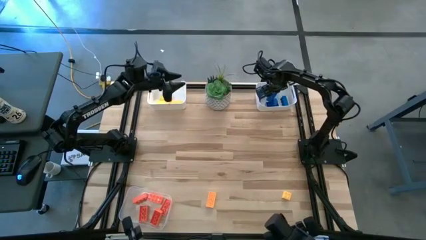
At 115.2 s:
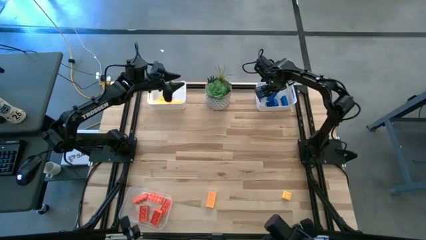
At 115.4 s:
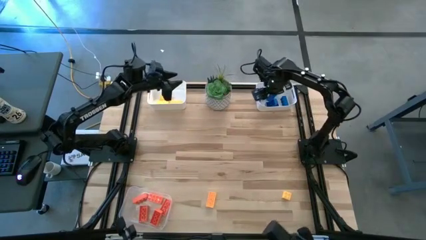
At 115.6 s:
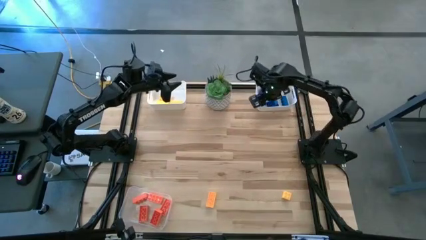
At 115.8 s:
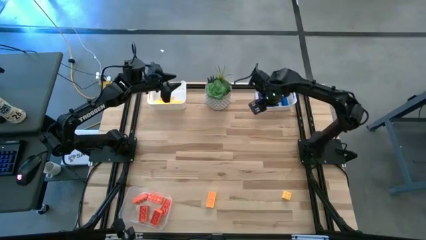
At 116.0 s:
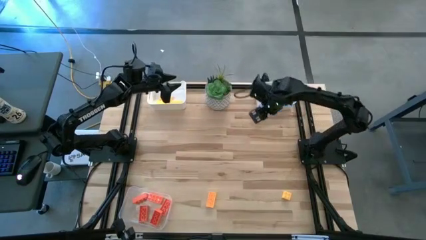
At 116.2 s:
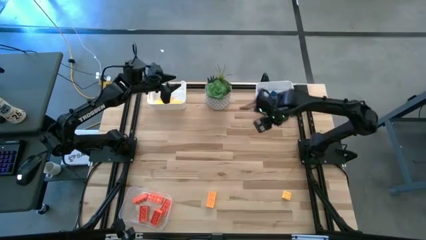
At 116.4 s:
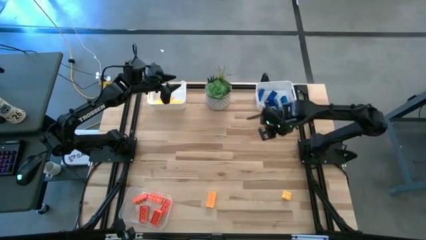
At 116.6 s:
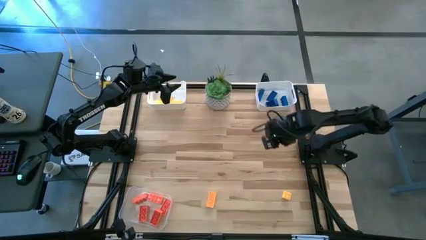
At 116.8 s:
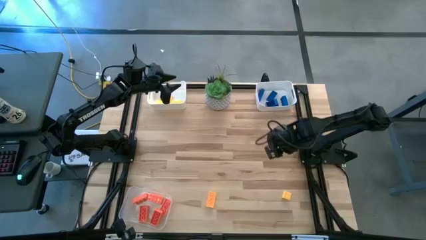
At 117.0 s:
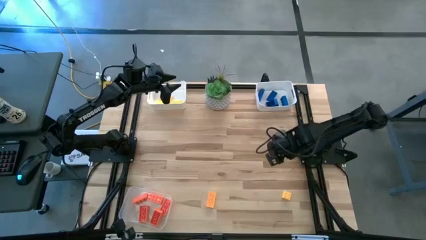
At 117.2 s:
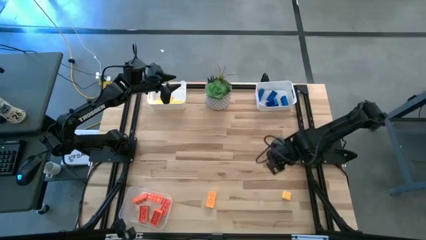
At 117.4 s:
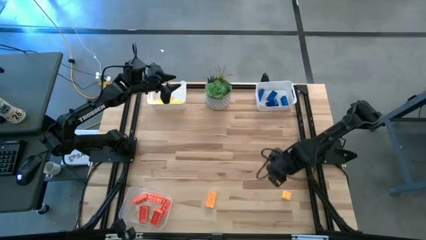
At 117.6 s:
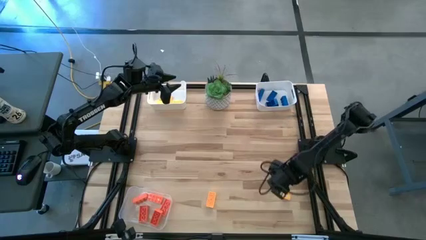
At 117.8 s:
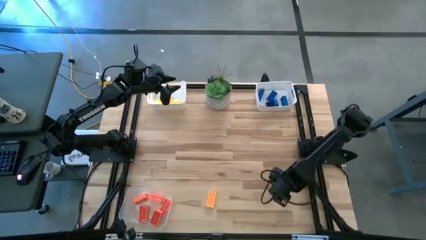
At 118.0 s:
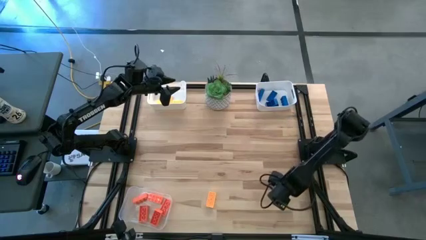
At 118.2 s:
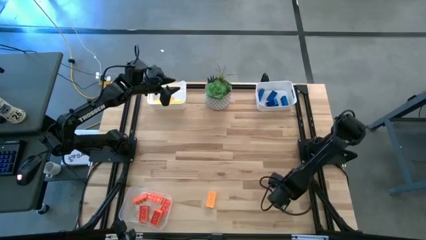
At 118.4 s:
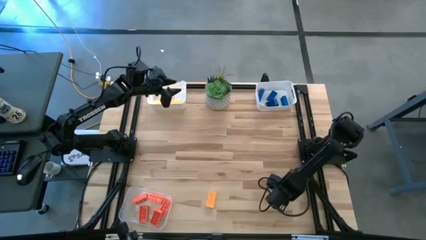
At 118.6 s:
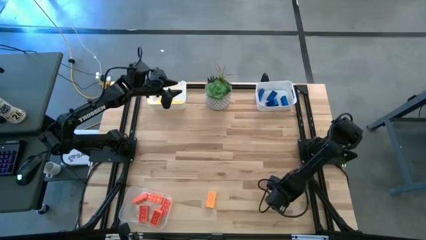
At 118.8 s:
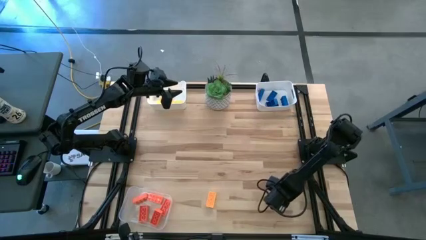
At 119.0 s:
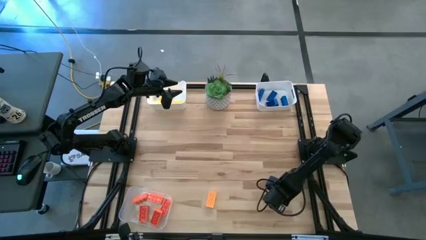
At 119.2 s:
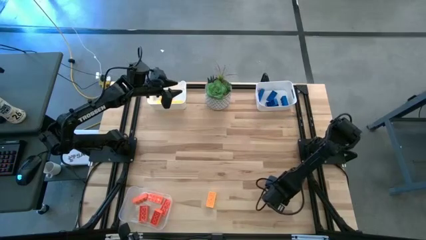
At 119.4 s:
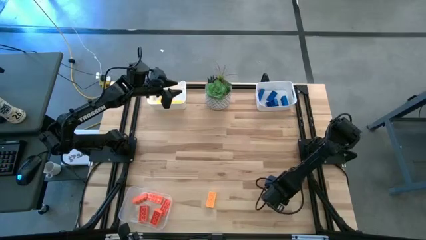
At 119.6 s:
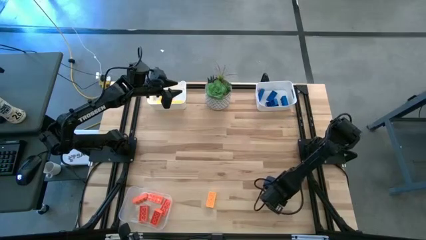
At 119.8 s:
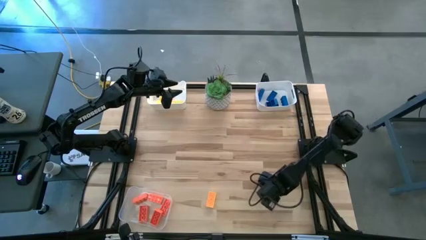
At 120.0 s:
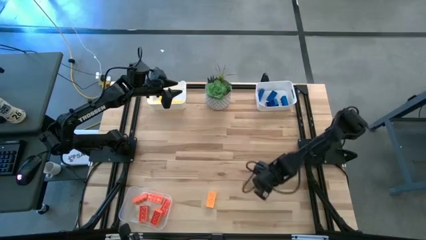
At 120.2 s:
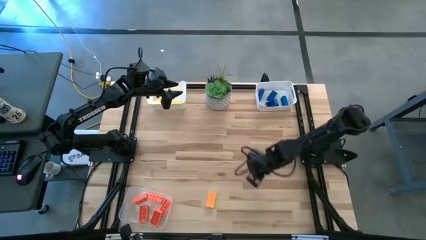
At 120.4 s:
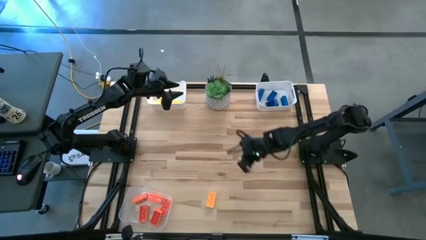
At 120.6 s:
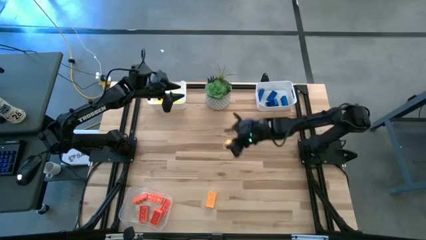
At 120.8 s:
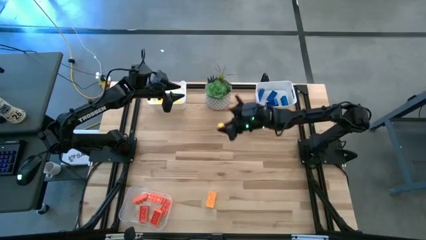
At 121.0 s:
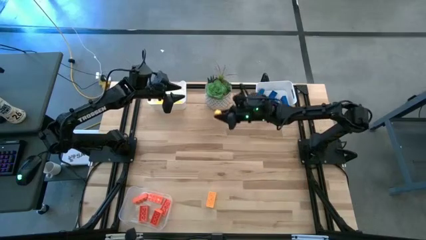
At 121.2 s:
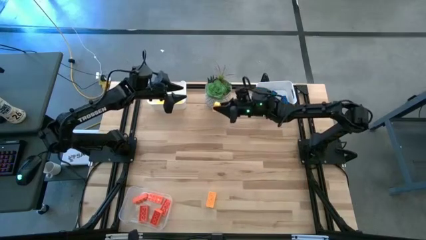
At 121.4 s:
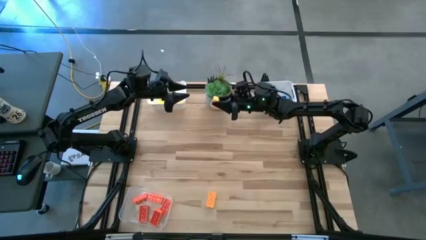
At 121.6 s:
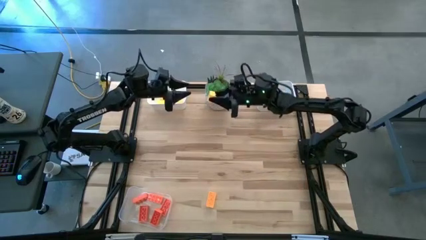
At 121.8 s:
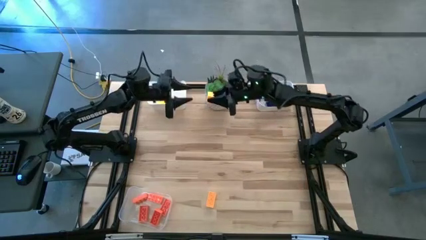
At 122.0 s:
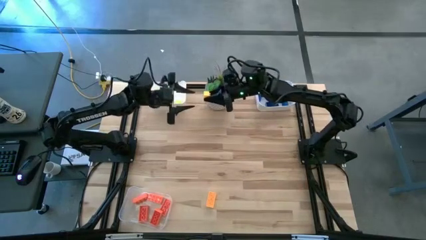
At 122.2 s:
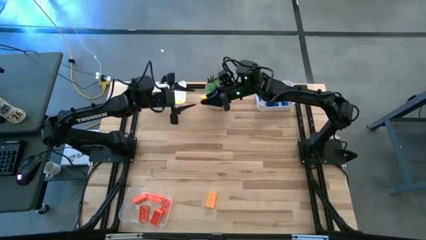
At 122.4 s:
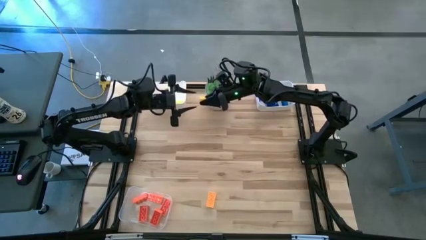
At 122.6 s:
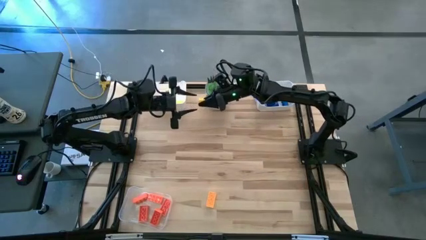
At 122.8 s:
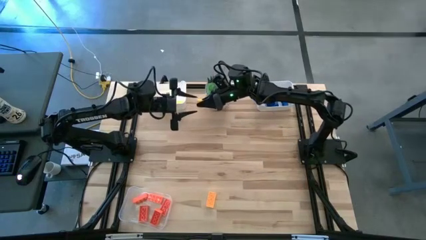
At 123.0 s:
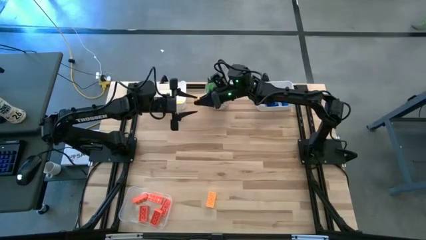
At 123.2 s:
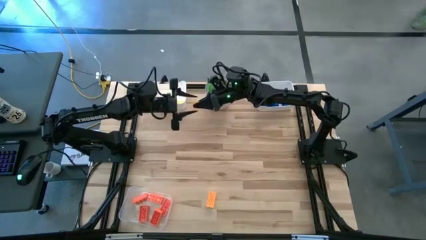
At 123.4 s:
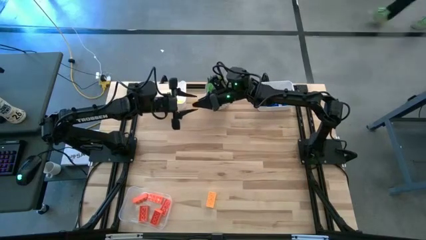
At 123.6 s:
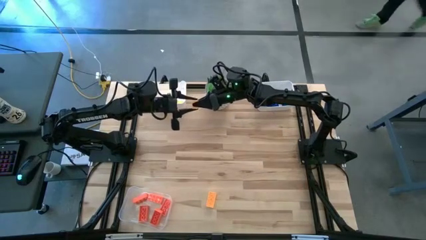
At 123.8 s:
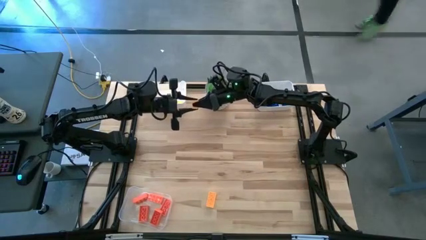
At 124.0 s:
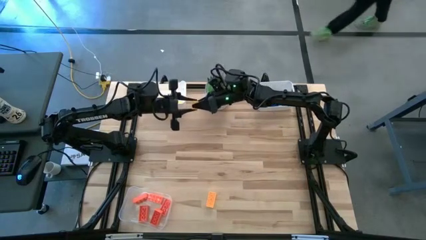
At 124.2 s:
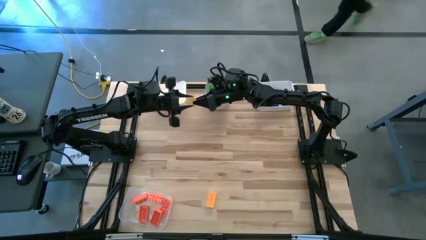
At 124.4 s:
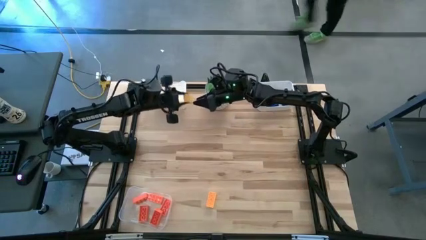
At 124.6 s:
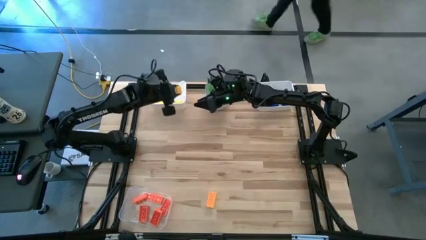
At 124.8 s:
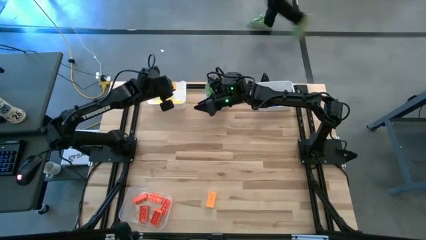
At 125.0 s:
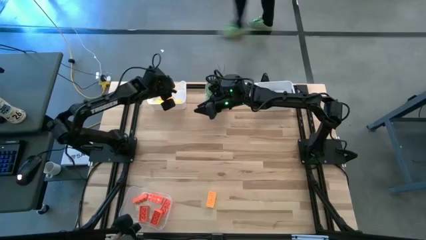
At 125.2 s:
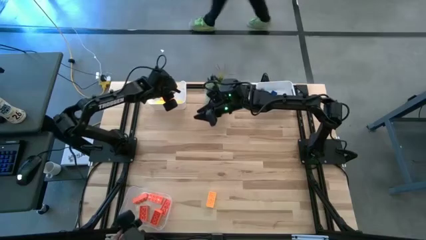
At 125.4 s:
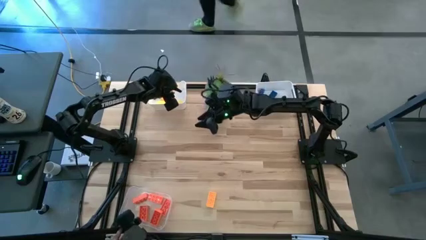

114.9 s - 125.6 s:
Task: Sort & place blocks by color
Put the yellow game piece into the left white bin

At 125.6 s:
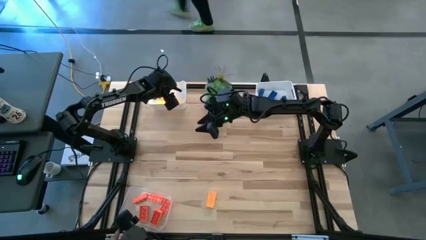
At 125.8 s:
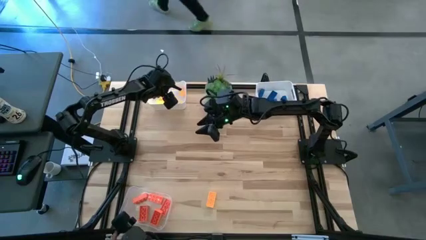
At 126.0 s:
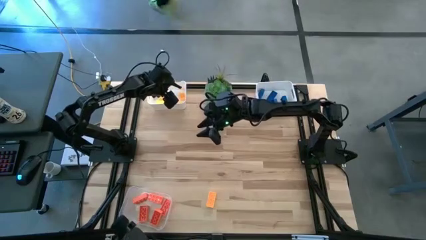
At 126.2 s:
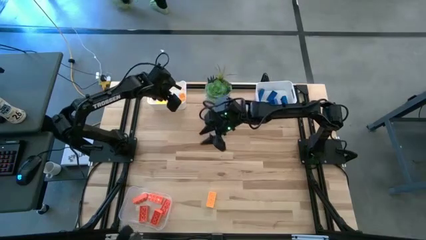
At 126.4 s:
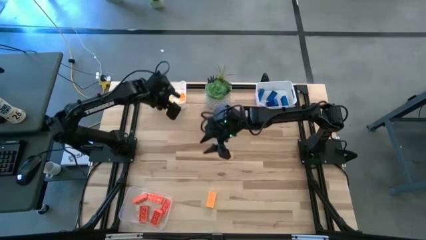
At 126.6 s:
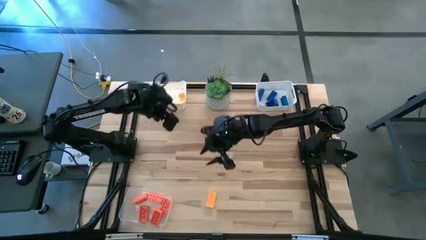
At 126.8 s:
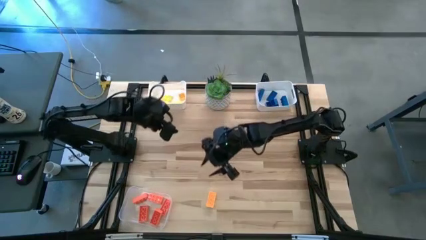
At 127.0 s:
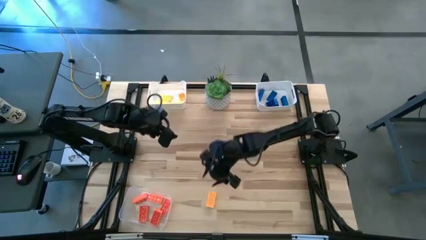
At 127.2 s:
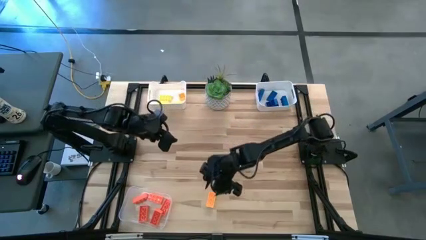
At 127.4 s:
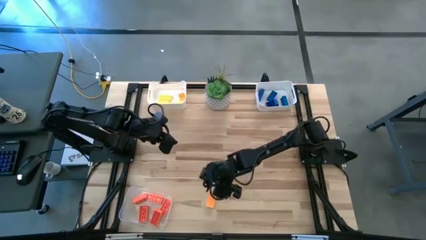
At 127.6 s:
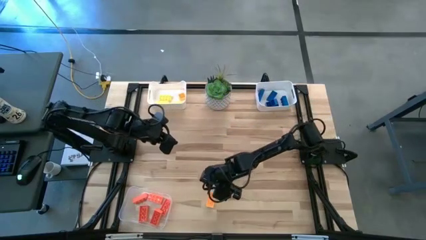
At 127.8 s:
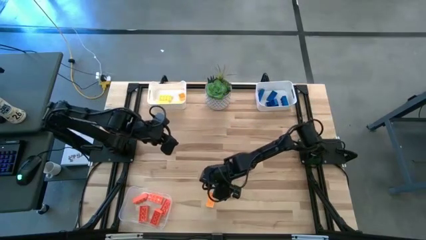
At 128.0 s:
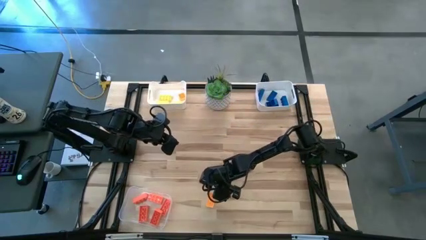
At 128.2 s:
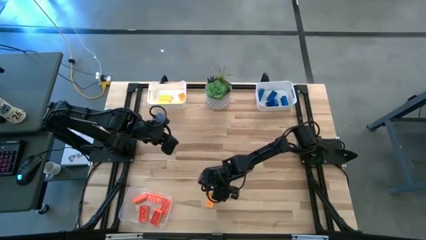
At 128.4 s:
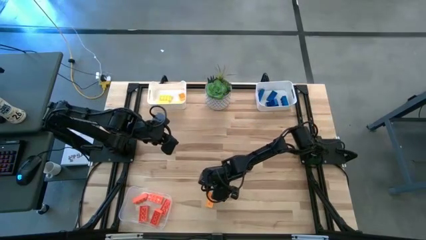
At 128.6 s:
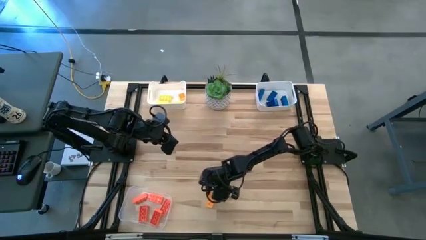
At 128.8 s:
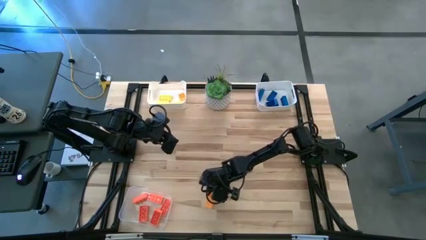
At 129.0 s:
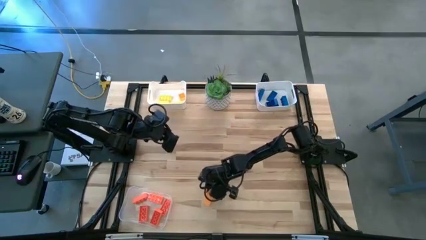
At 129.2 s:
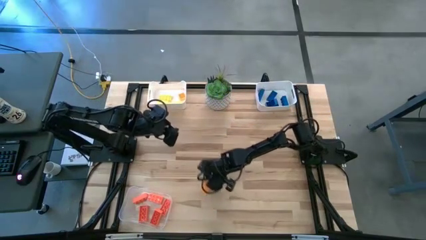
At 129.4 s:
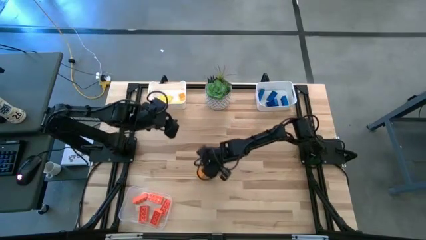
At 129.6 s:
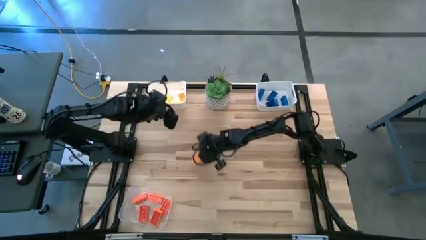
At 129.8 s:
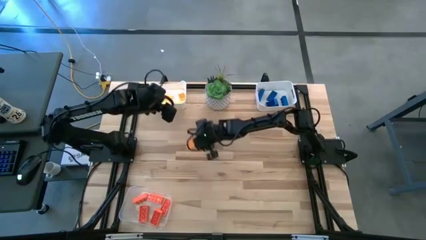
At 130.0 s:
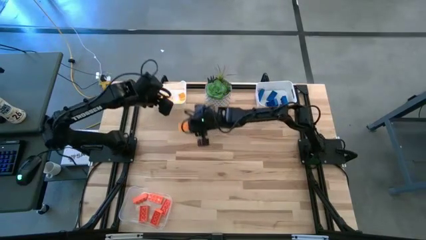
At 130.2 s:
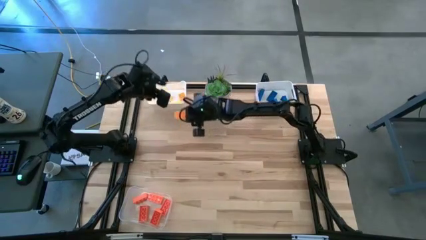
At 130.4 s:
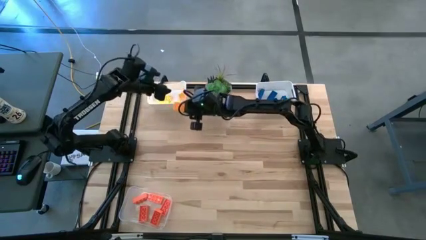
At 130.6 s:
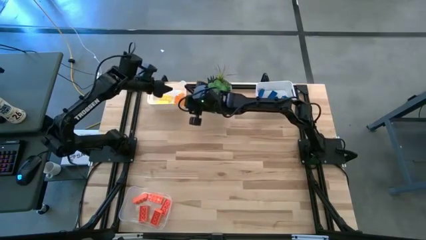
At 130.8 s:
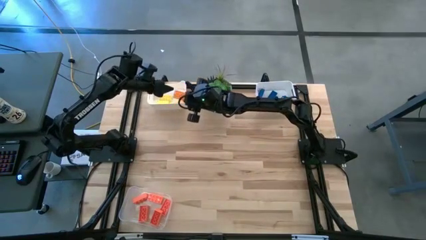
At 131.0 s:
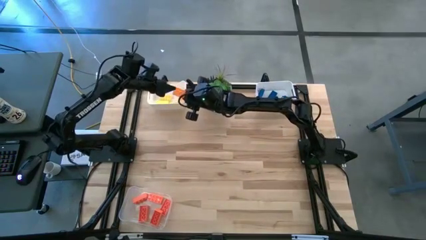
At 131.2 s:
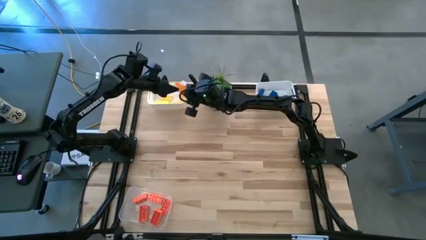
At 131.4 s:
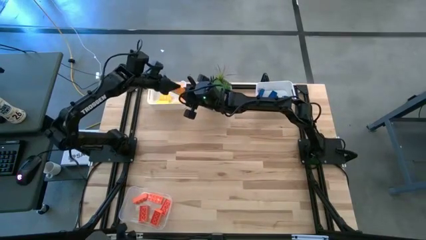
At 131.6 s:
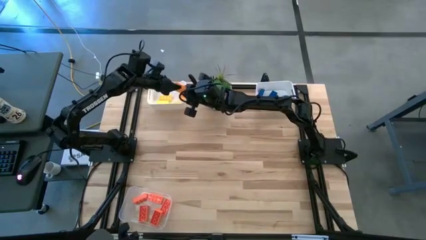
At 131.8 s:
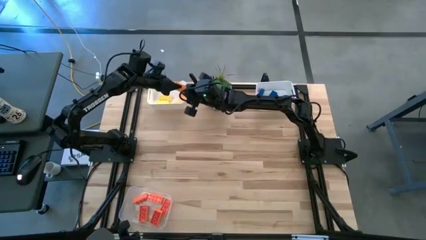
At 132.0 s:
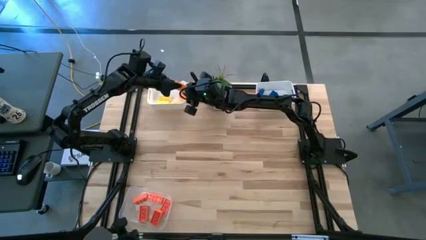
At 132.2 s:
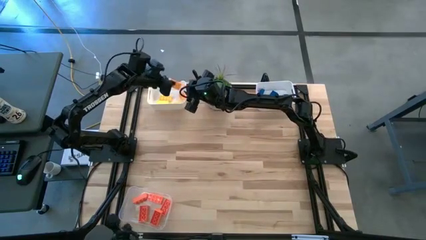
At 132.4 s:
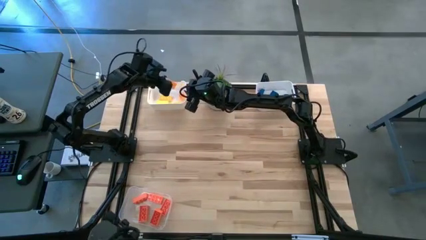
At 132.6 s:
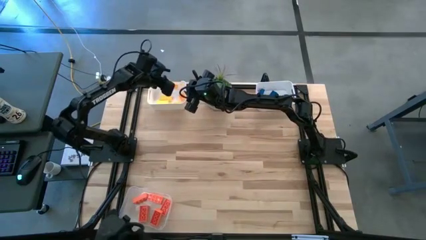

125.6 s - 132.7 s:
Put the yellow game piece into the left white bin
